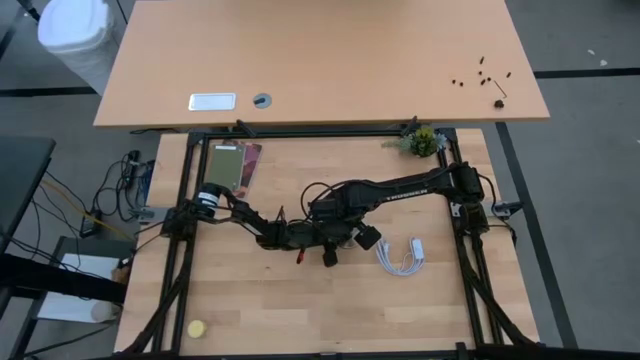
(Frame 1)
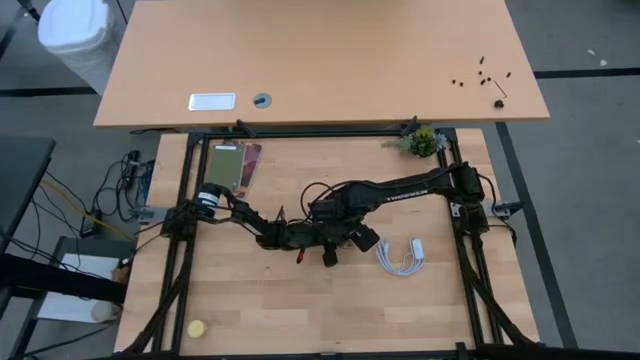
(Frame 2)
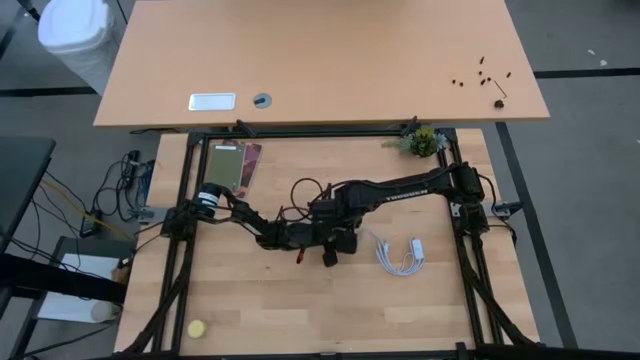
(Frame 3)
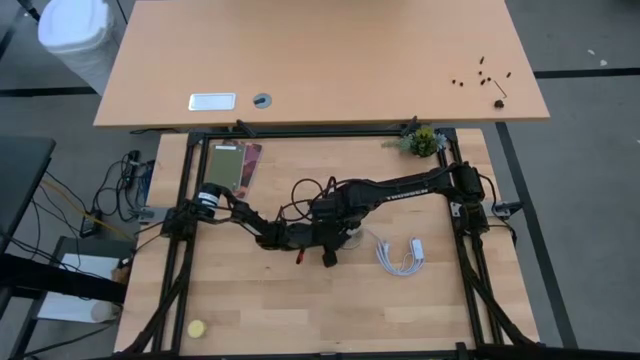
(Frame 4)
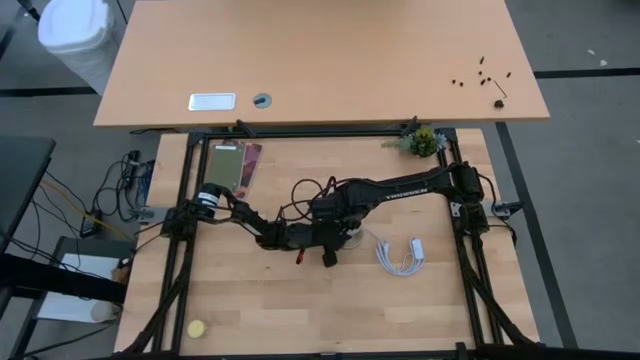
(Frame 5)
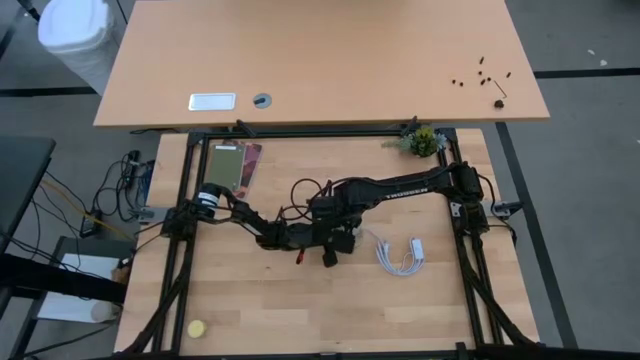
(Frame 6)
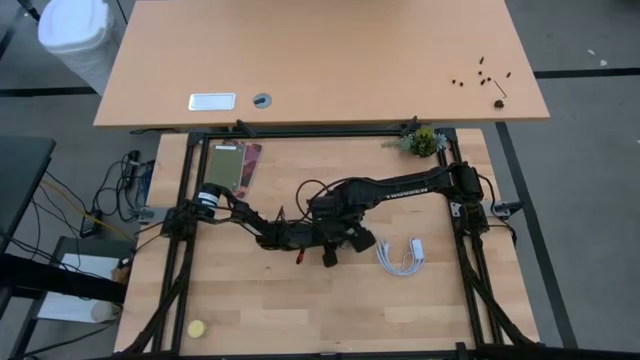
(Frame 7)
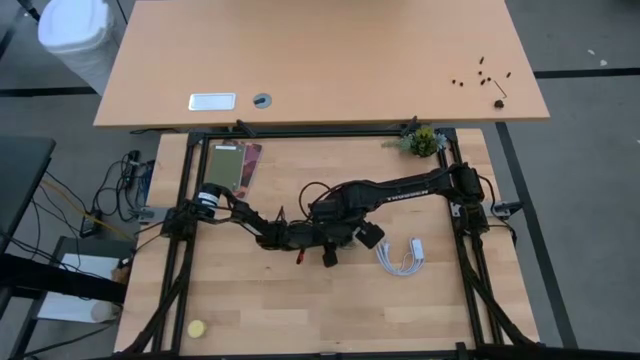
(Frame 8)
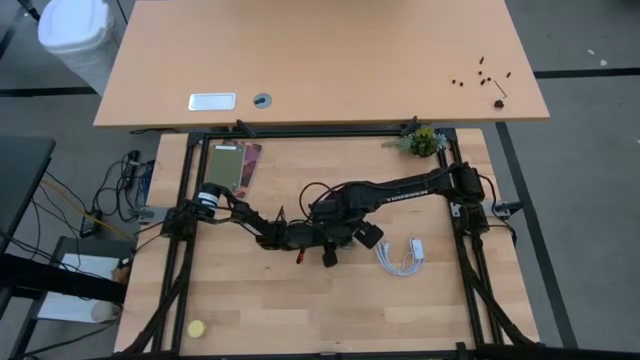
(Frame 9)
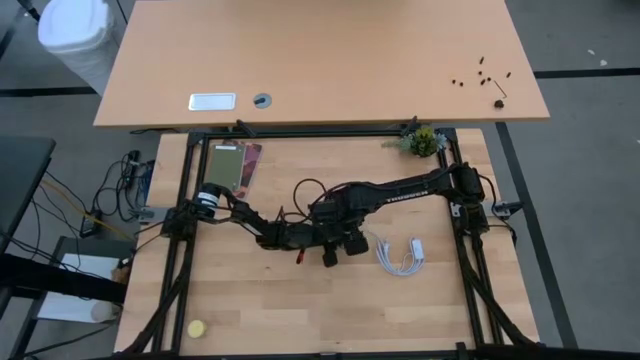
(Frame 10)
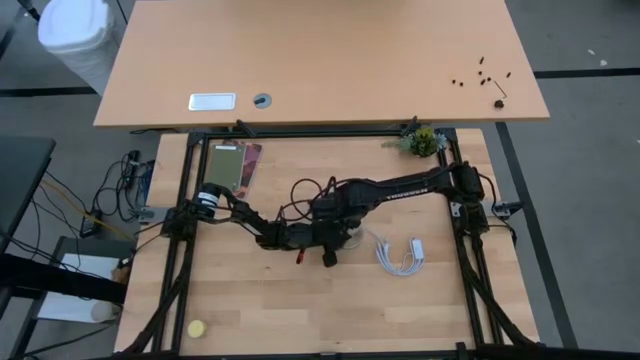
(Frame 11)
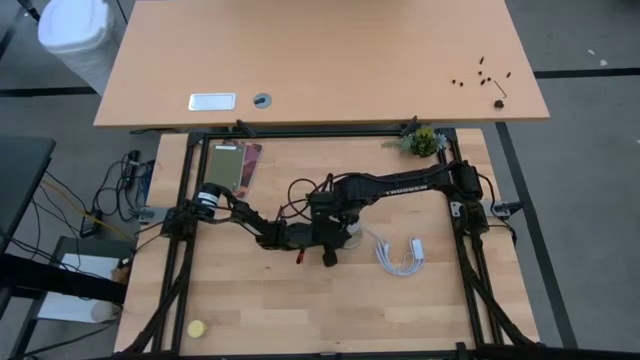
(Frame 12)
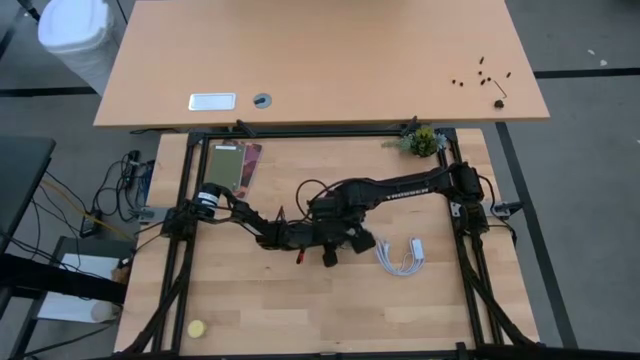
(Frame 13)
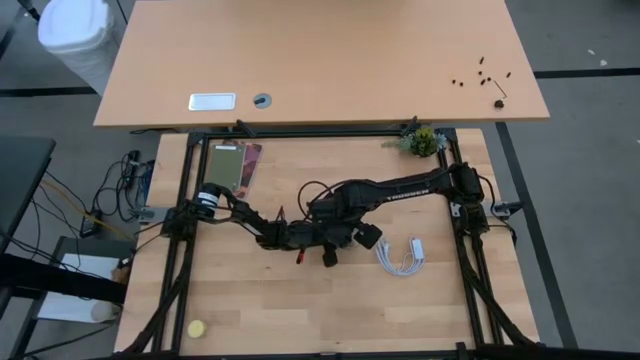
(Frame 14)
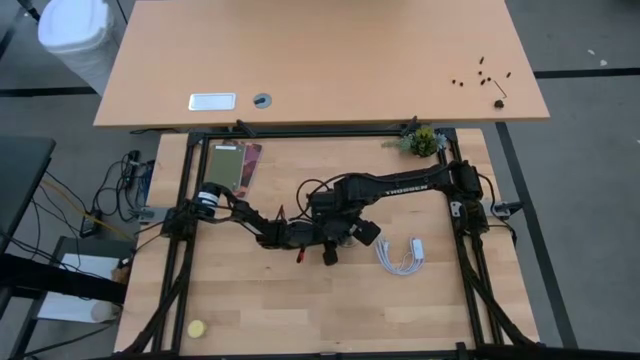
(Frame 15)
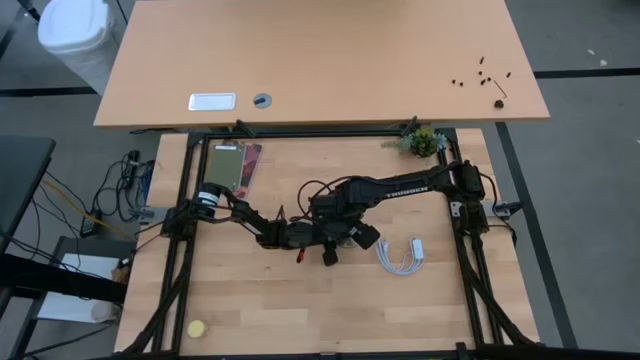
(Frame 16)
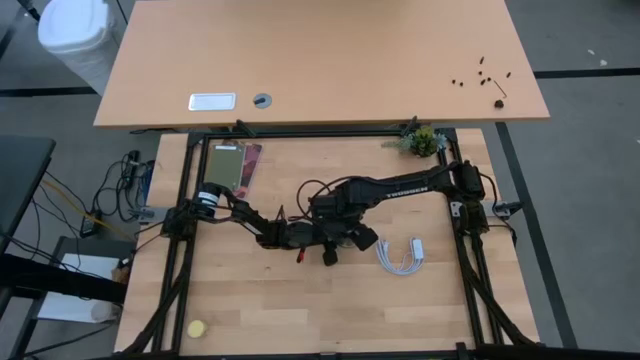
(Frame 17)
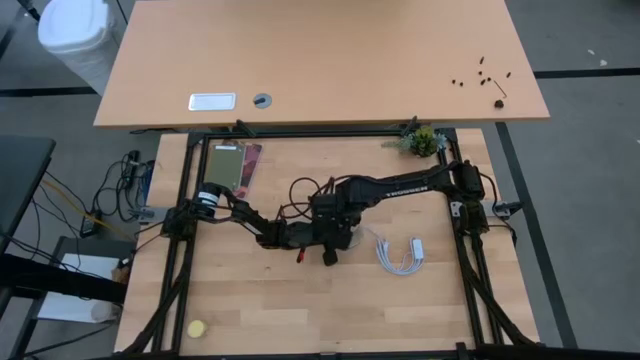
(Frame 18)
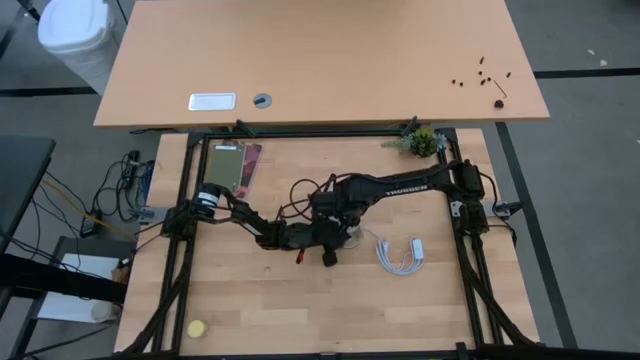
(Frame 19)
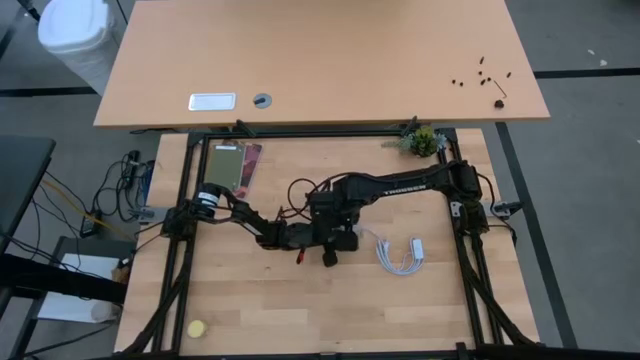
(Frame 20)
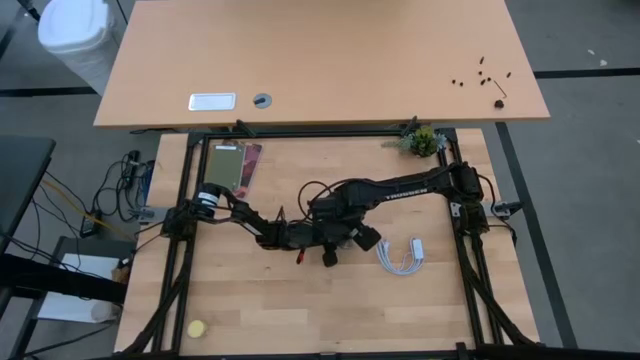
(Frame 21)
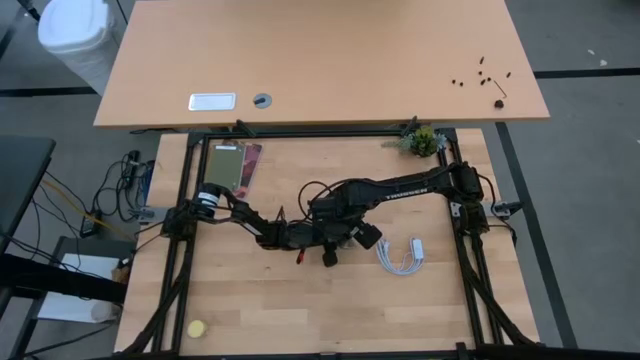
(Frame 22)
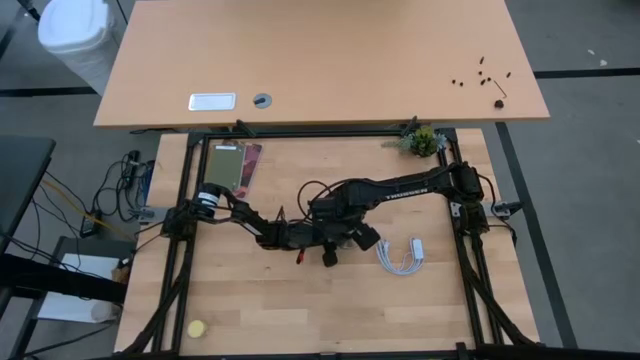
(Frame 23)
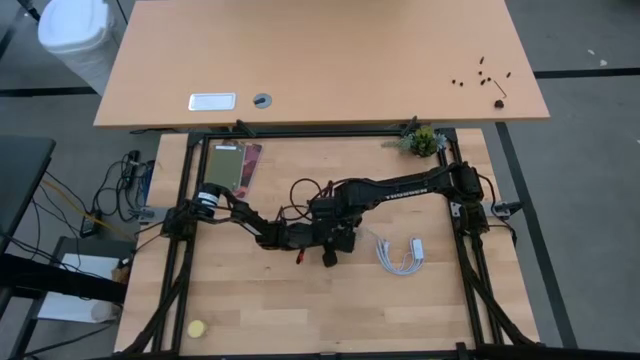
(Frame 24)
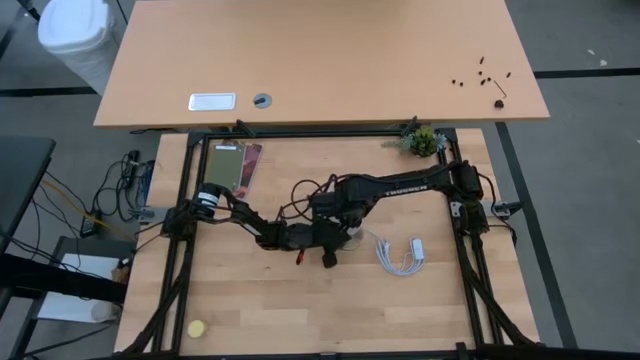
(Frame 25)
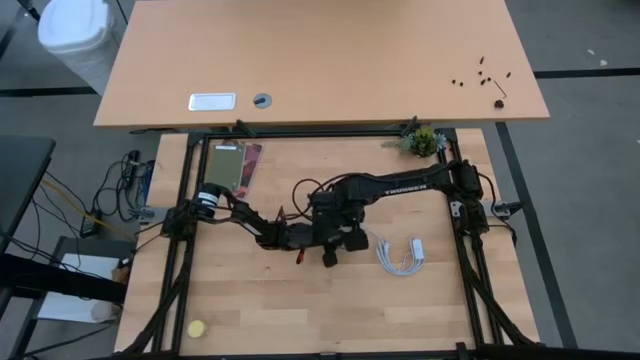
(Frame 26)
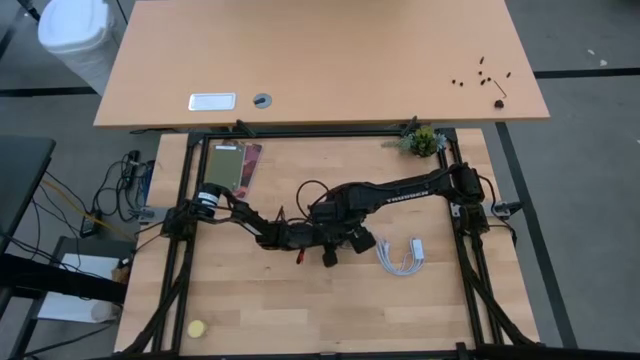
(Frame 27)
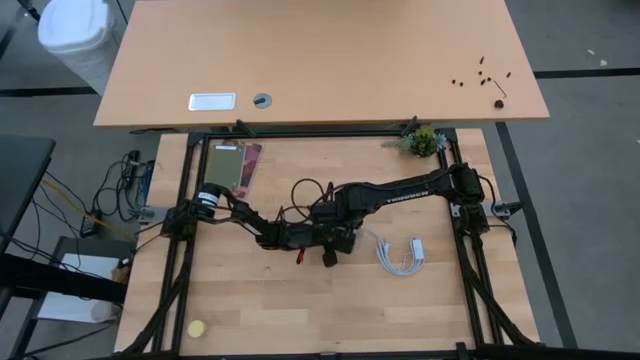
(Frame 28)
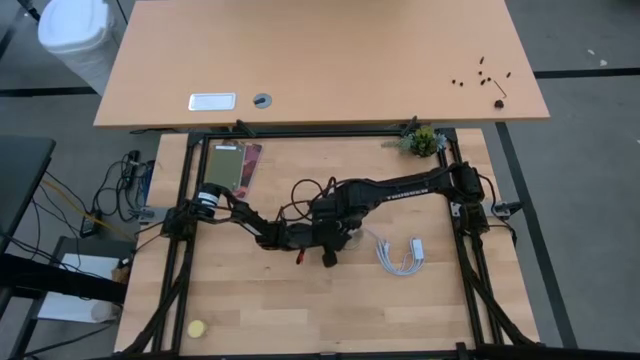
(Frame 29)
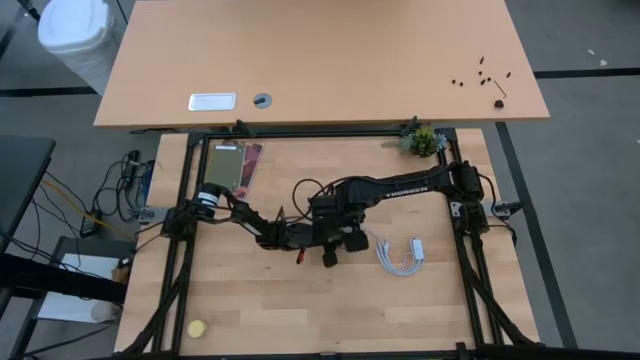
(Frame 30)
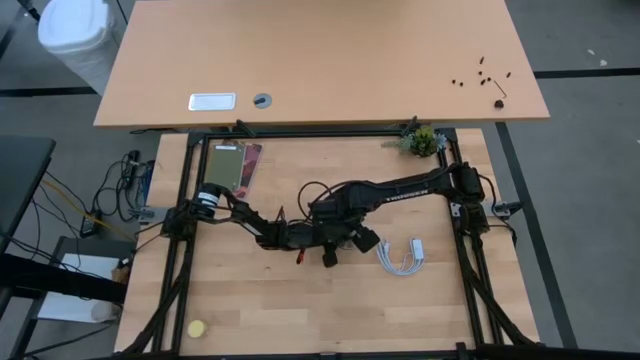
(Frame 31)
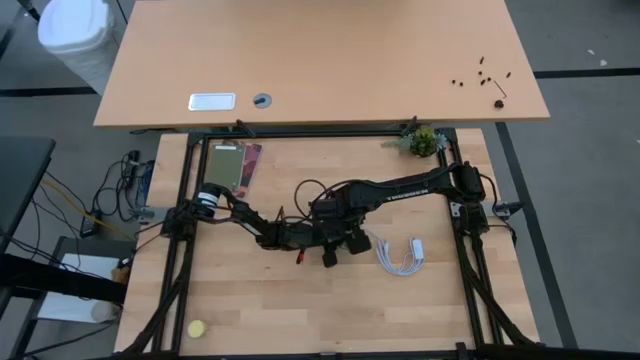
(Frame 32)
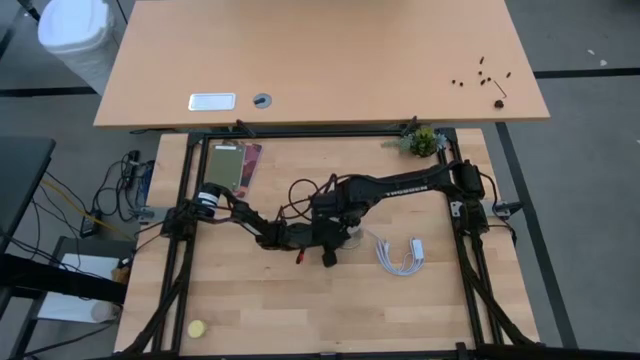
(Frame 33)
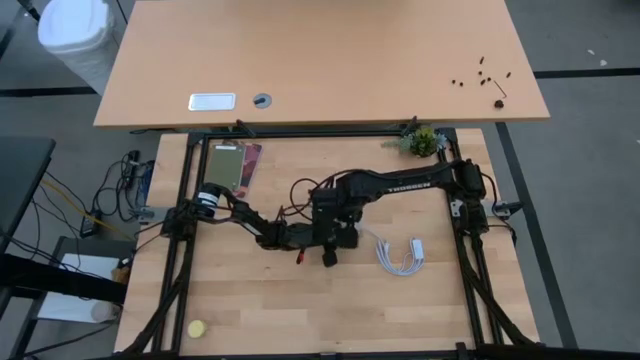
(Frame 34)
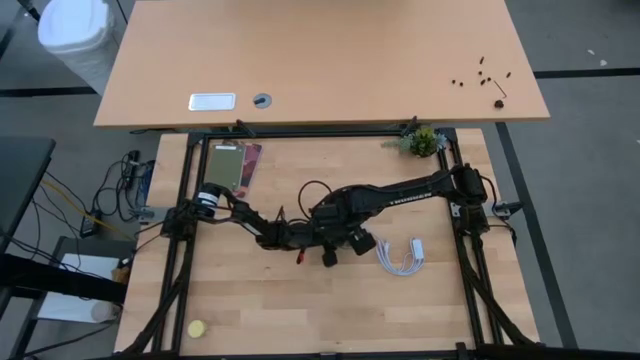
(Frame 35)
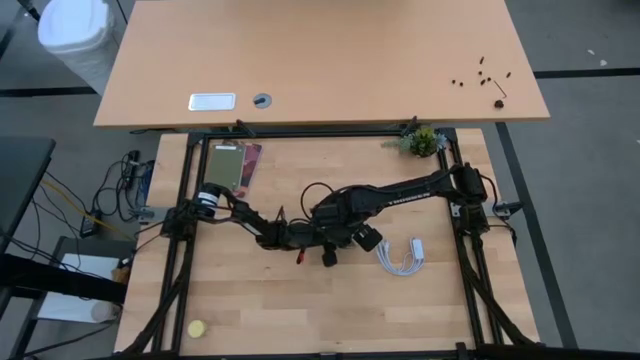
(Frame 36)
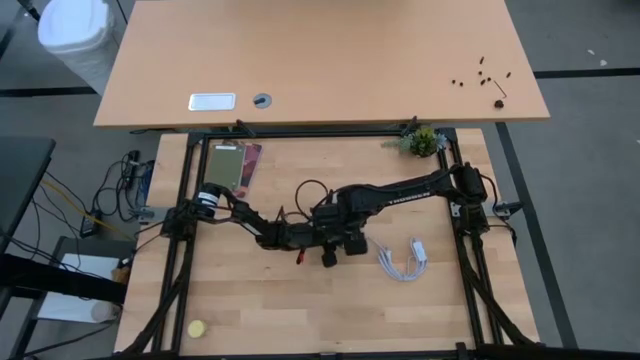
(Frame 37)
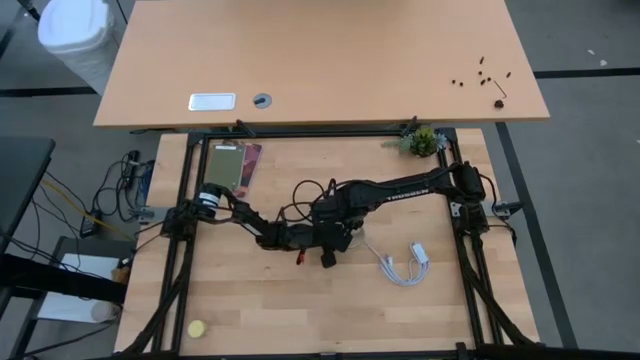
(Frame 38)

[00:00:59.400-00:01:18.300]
Task: Screw lightbulb
Insert the white lightbulb into the desk lamp

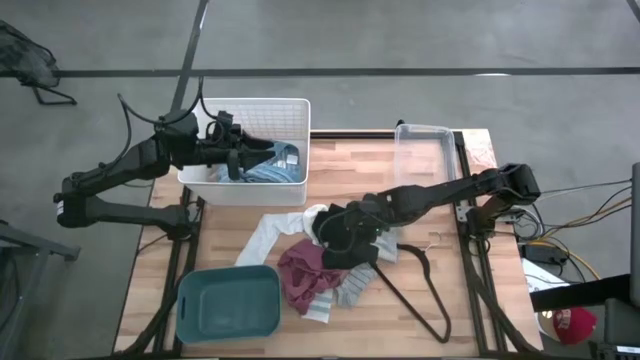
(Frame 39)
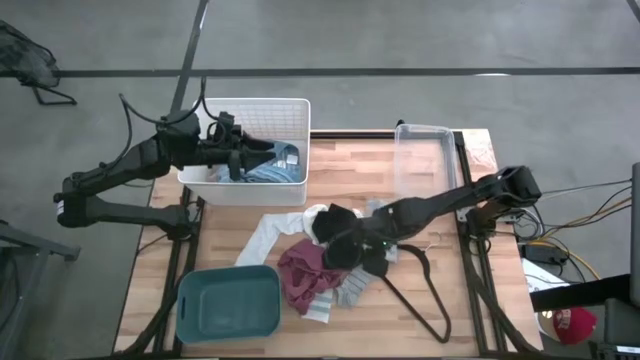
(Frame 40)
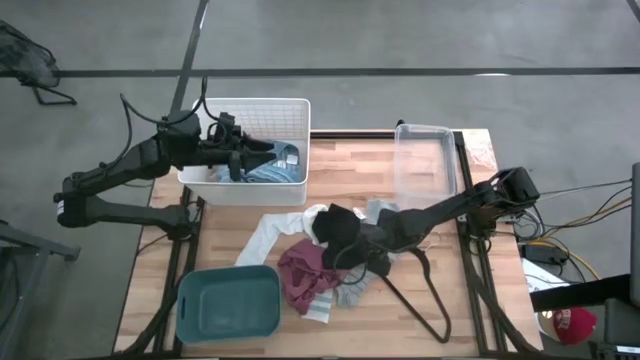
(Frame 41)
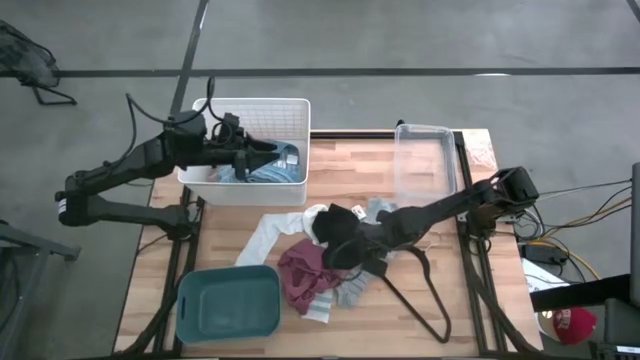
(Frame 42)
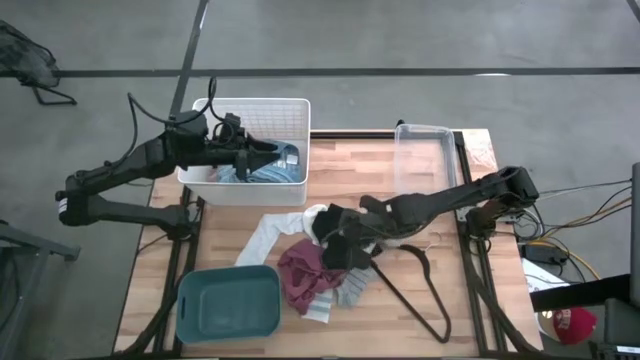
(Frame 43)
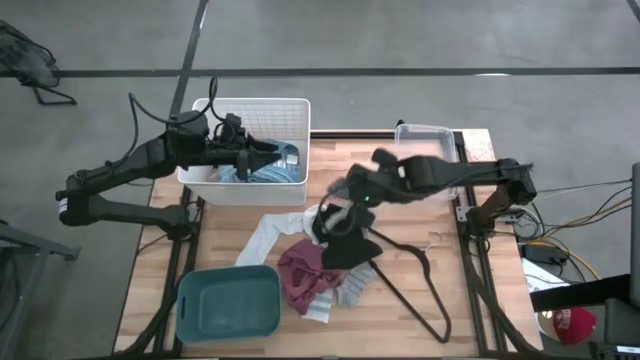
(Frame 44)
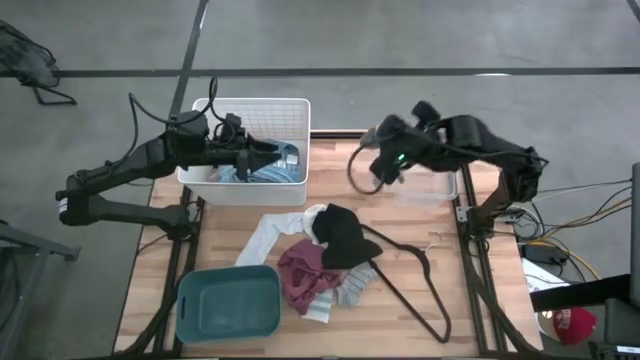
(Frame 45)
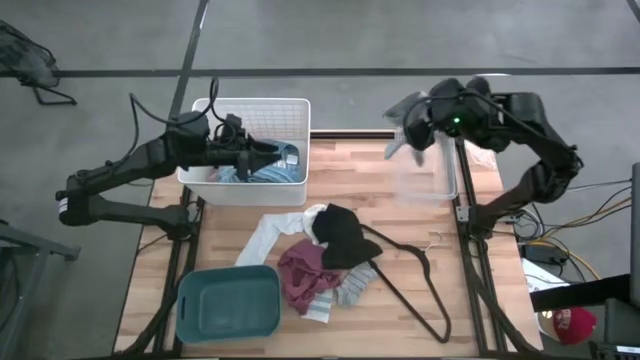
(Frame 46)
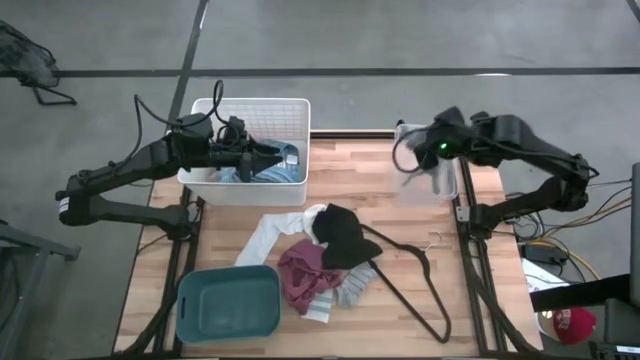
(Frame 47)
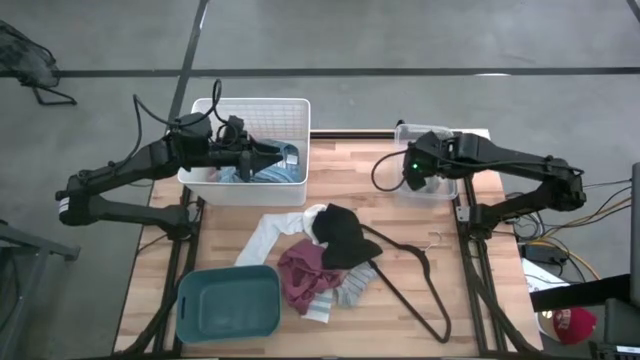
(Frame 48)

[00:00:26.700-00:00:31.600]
Task: Pick & Place Cloths
Put the gray boxers into the transparent bin
